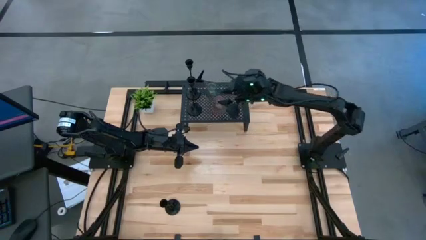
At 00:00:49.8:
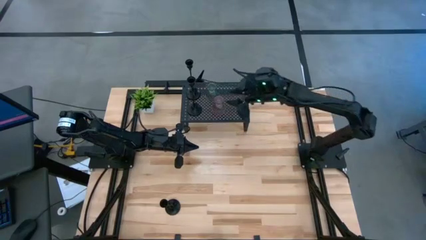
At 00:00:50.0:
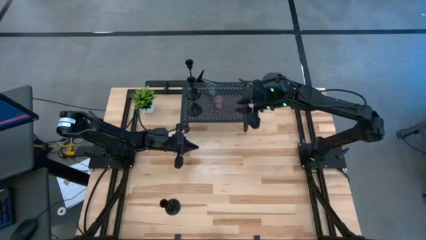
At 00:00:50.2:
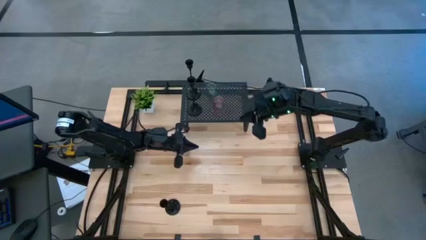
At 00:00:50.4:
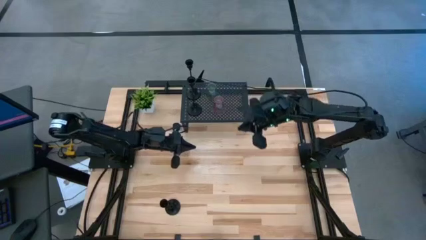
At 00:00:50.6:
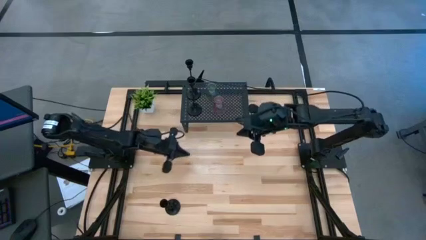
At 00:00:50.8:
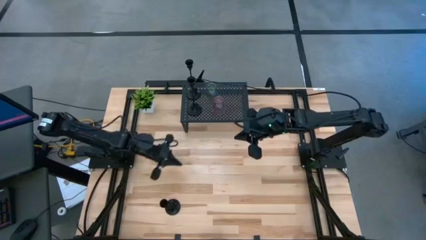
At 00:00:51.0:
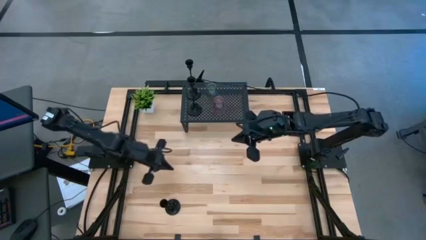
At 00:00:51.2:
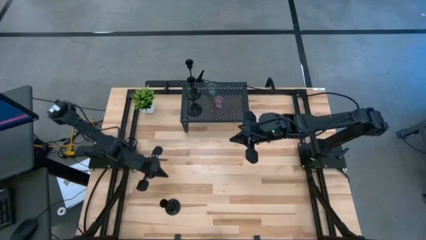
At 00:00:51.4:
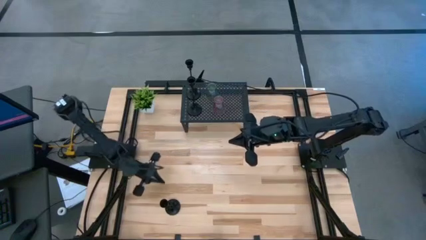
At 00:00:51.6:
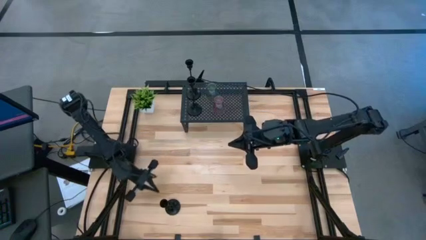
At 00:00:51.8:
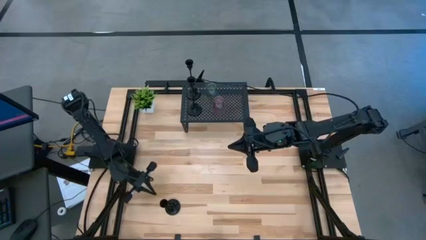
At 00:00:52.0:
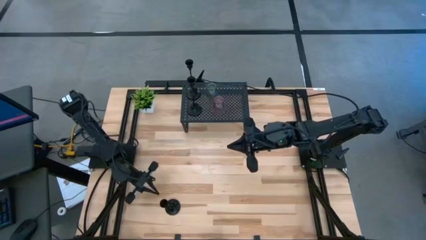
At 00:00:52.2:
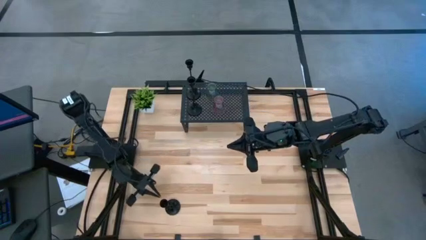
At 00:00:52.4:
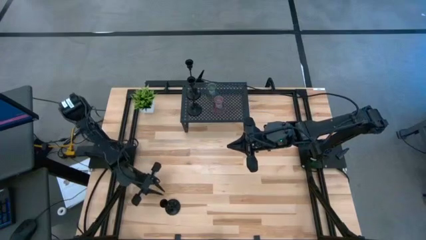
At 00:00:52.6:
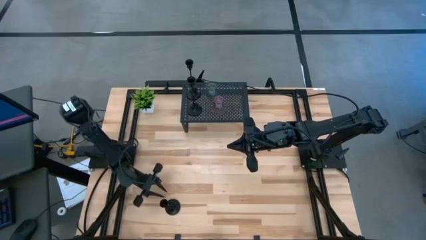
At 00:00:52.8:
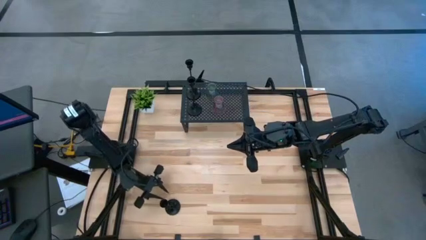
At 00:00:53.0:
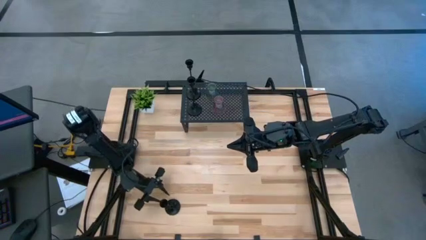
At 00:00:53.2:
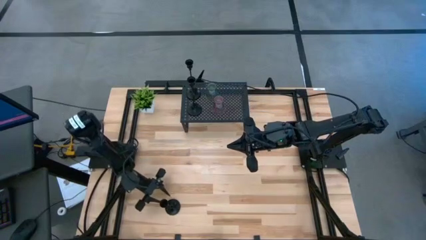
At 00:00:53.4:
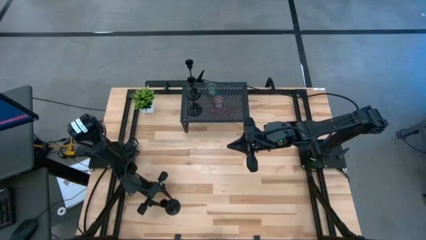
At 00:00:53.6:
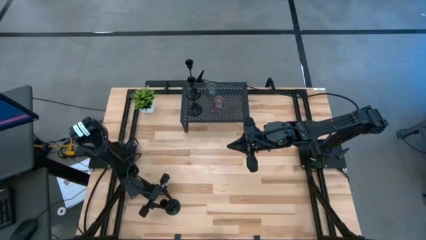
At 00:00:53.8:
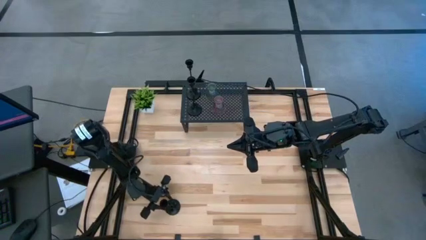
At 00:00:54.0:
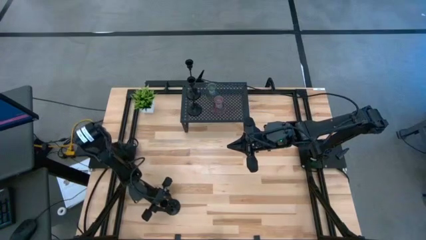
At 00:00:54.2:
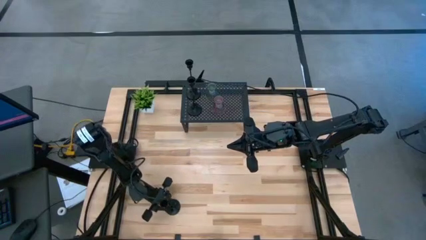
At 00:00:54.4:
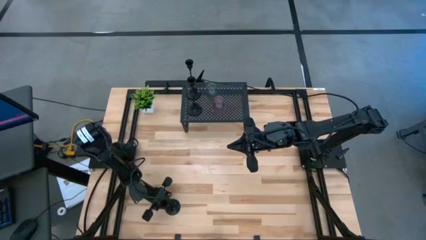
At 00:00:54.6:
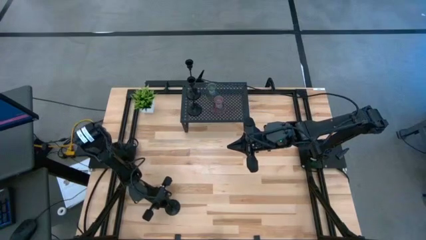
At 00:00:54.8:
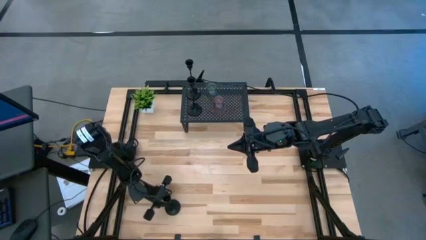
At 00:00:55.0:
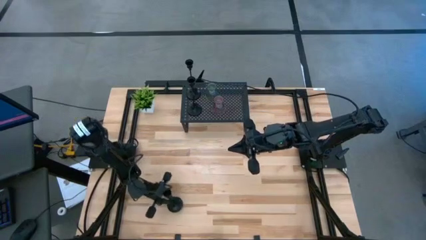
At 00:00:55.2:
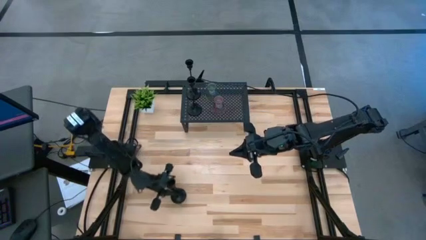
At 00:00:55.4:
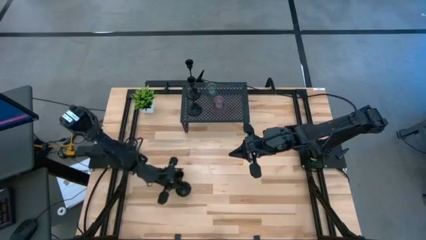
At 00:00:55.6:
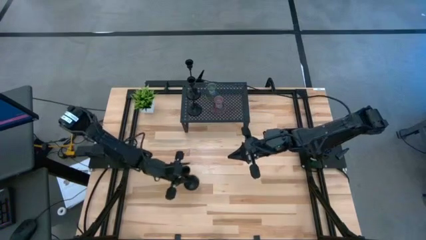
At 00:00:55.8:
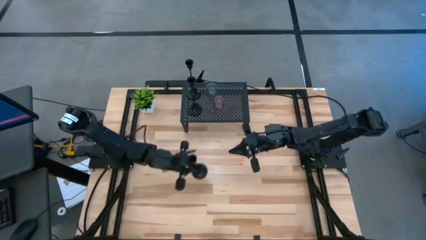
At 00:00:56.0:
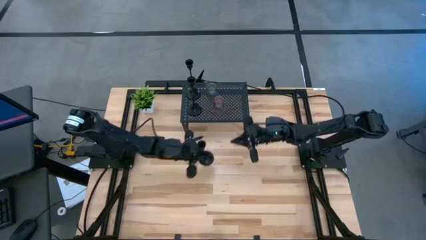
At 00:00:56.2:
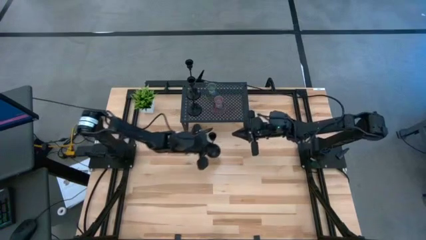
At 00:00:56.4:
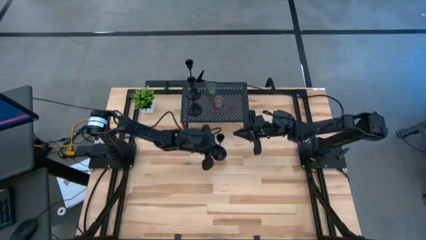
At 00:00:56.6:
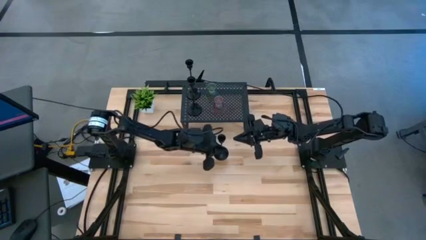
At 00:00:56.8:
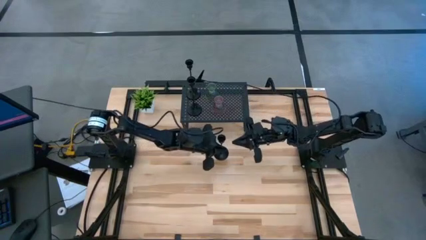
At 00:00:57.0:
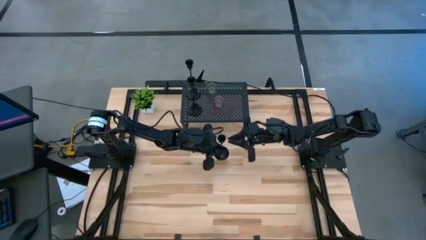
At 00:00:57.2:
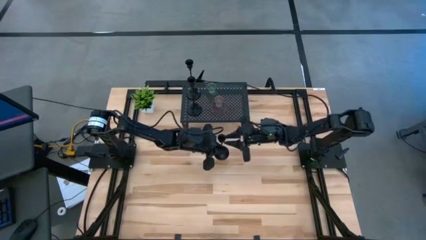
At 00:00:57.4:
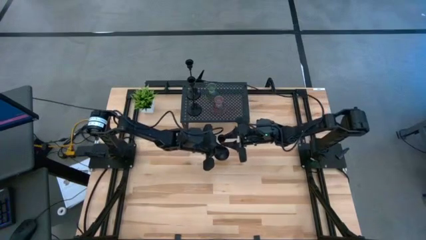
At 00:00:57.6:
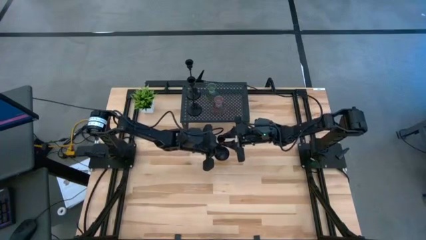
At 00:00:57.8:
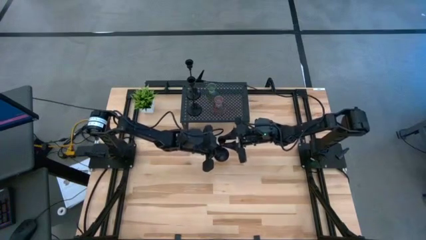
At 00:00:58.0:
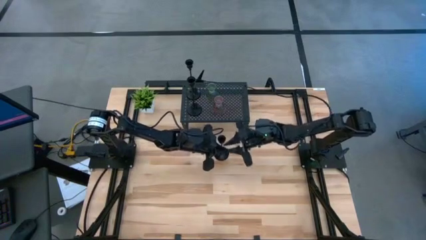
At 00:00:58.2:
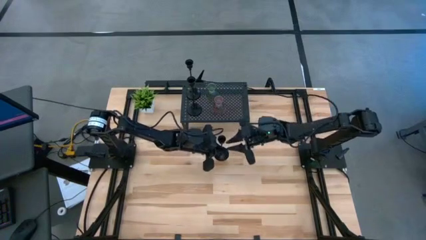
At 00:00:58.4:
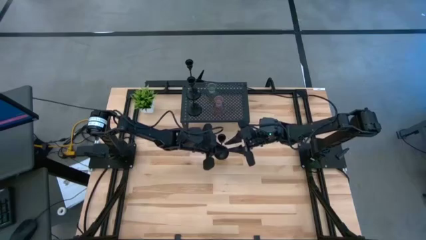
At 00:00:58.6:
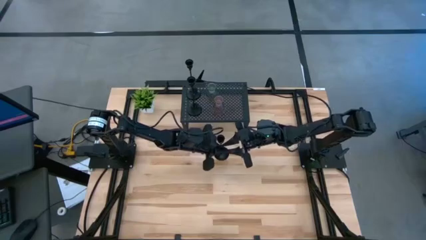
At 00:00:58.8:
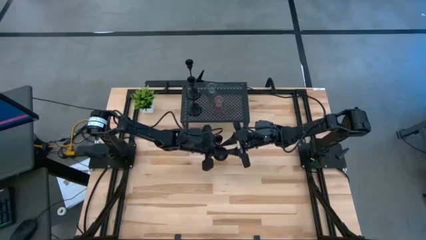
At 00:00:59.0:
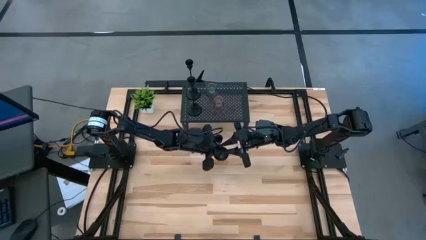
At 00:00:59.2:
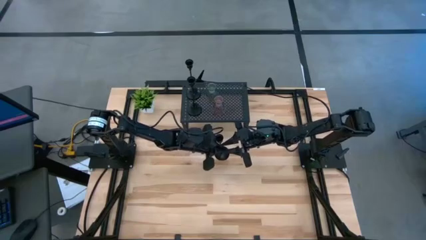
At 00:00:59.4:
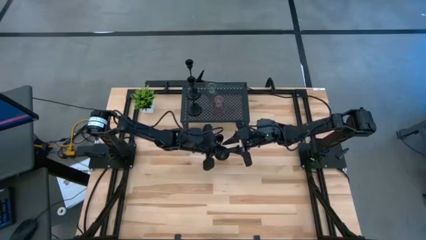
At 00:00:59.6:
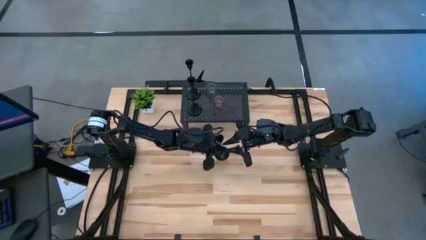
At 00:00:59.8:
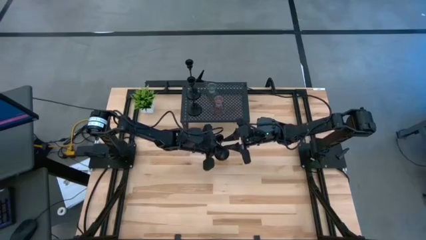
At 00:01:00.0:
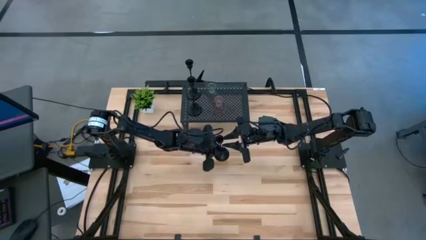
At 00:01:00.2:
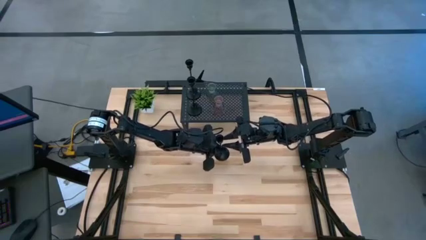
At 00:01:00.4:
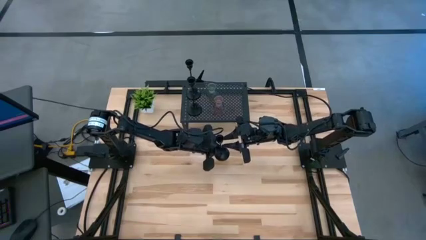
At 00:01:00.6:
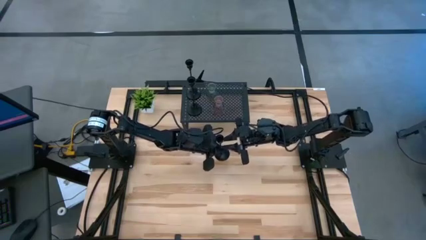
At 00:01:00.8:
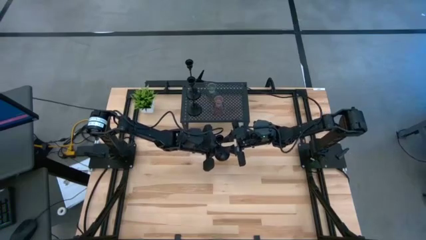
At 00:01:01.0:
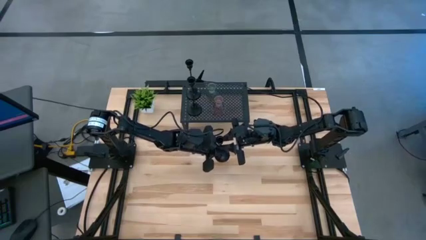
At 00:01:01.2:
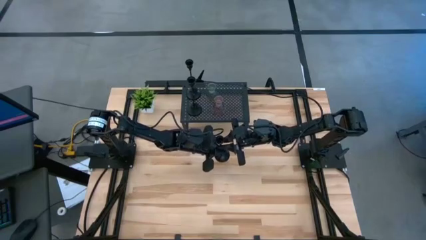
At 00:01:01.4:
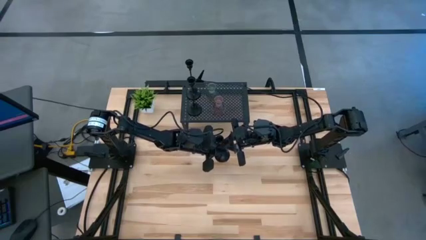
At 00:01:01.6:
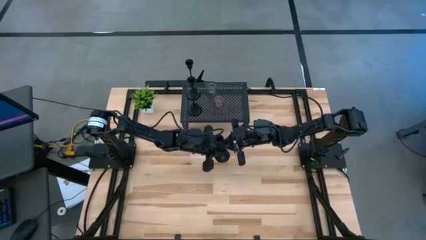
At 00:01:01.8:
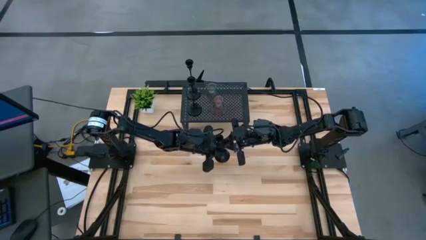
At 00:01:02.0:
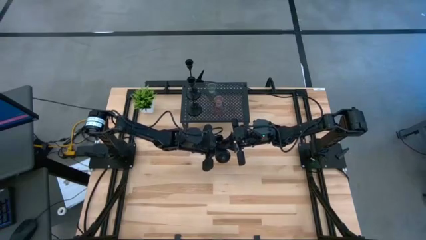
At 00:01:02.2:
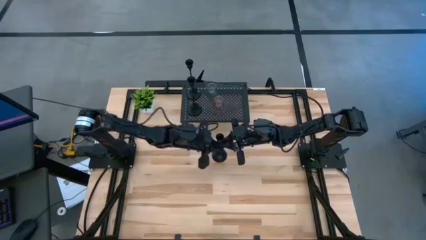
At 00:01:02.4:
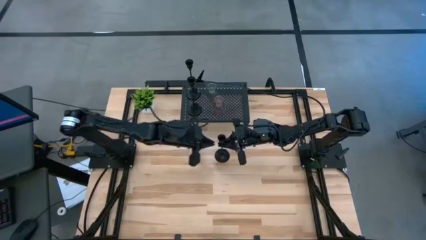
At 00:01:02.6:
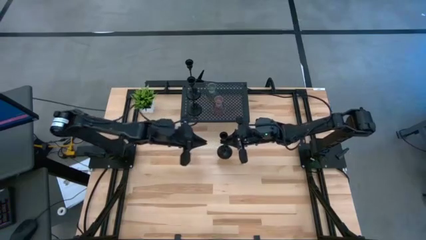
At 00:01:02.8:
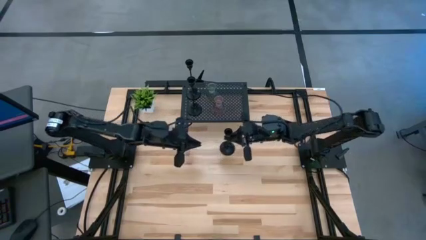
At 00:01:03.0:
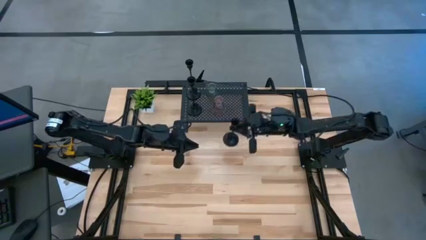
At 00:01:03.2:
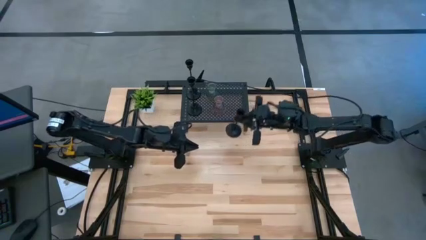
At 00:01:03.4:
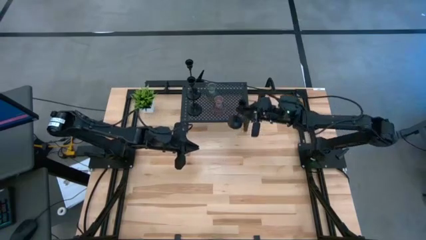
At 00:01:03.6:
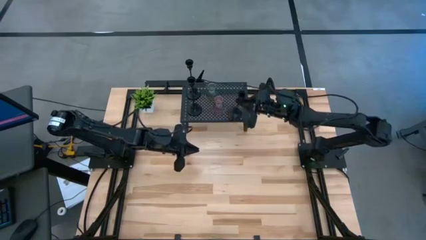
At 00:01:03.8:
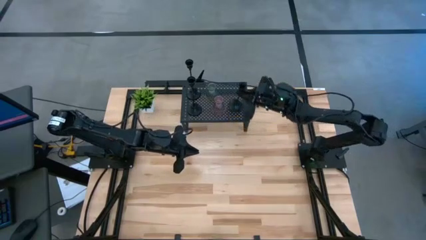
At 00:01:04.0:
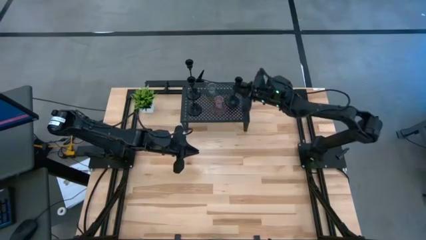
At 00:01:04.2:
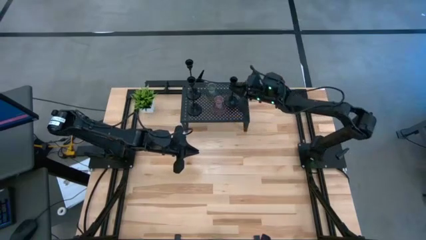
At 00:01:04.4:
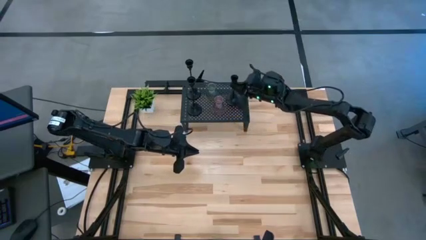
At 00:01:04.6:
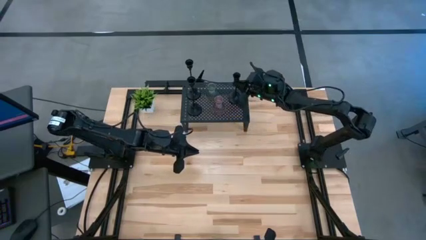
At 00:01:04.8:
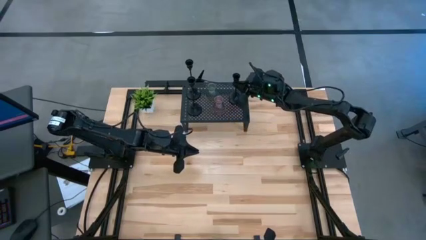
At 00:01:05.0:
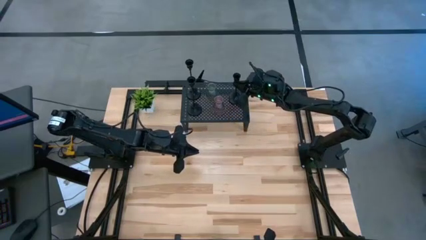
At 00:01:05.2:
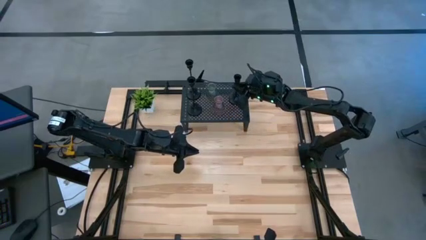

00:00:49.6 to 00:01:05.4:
Task: Pick & Place candle stick holders
Put the black candle holder on the shelf
